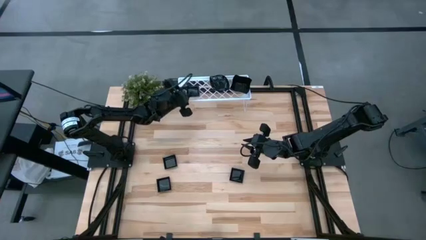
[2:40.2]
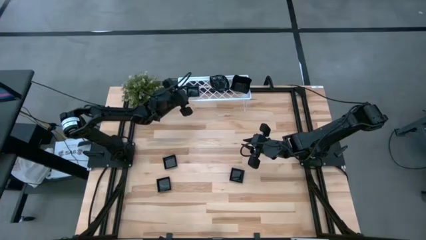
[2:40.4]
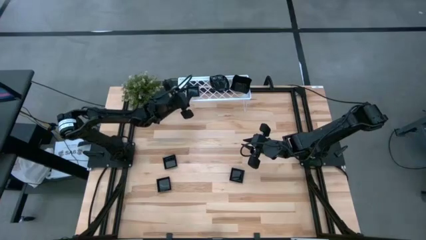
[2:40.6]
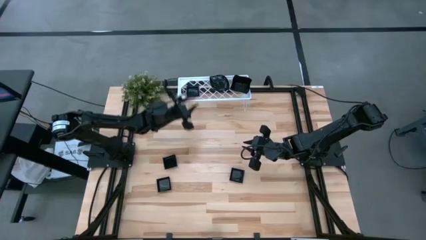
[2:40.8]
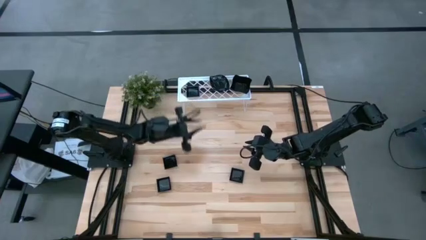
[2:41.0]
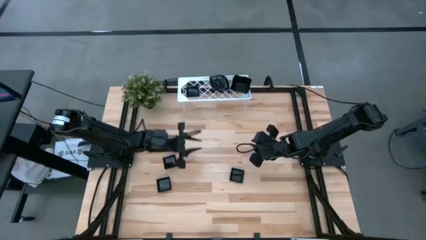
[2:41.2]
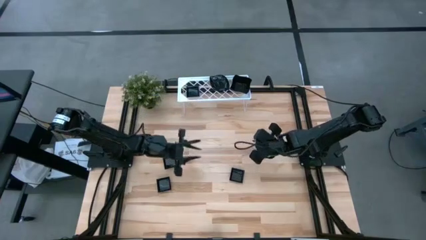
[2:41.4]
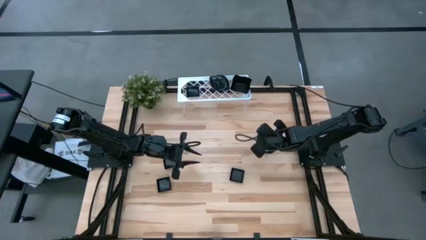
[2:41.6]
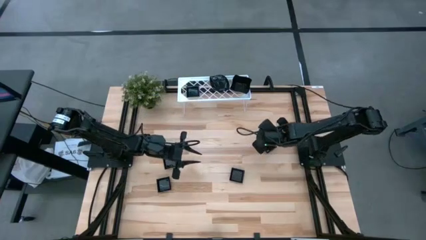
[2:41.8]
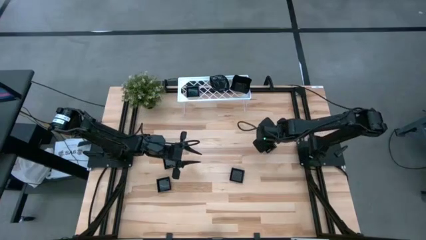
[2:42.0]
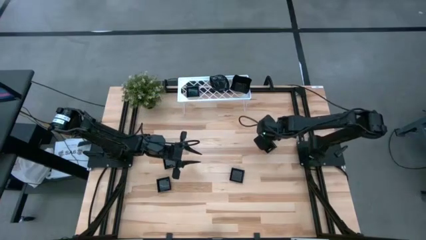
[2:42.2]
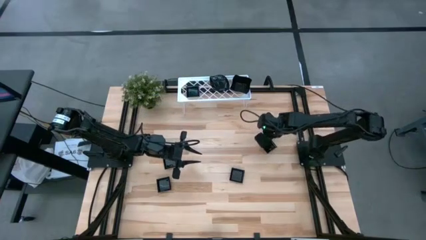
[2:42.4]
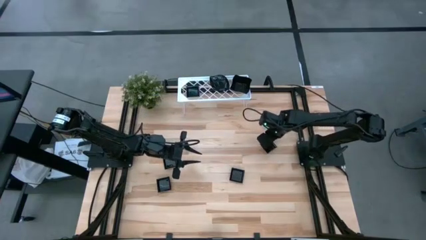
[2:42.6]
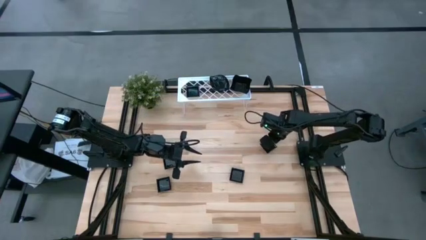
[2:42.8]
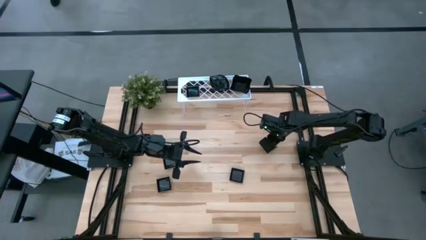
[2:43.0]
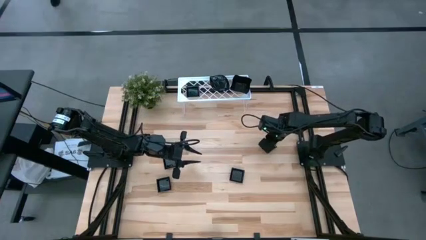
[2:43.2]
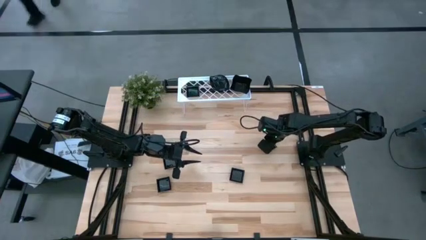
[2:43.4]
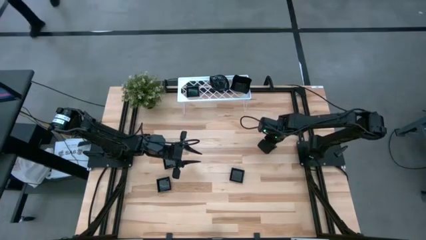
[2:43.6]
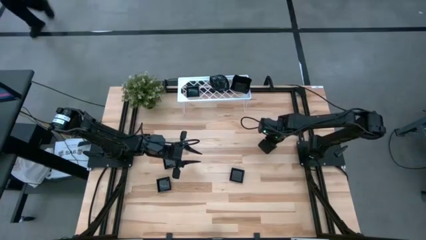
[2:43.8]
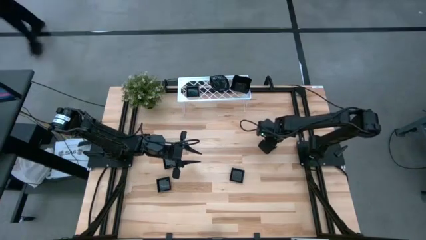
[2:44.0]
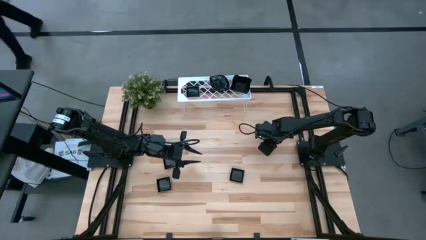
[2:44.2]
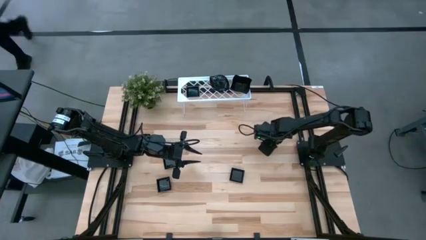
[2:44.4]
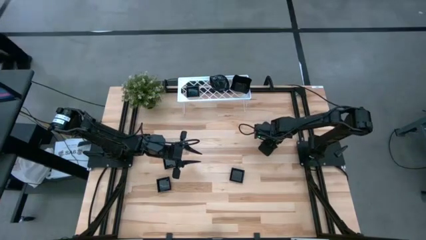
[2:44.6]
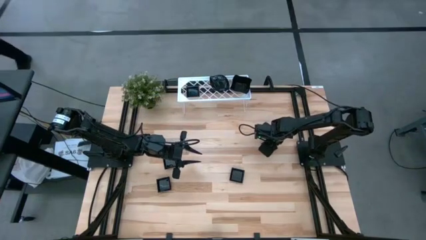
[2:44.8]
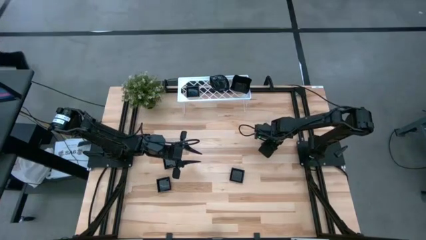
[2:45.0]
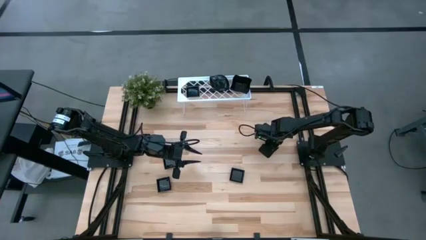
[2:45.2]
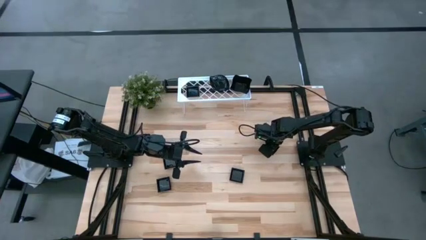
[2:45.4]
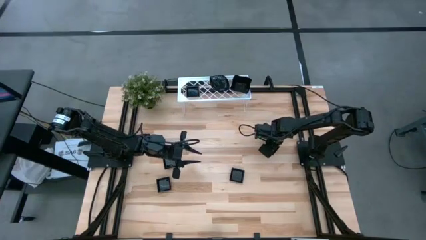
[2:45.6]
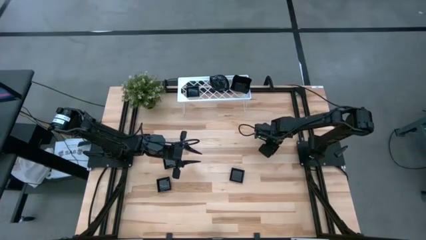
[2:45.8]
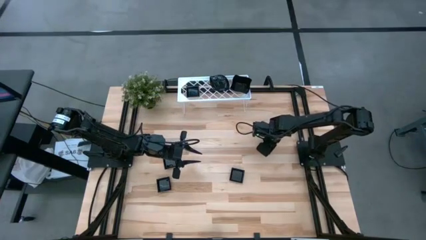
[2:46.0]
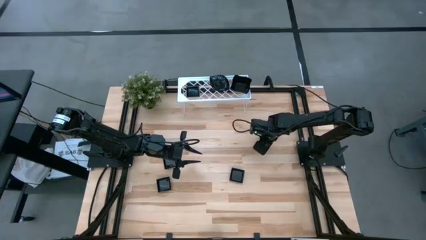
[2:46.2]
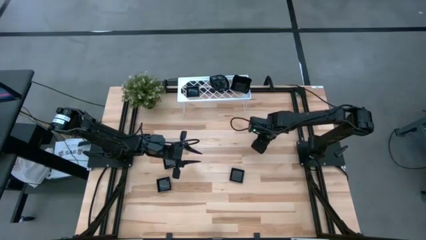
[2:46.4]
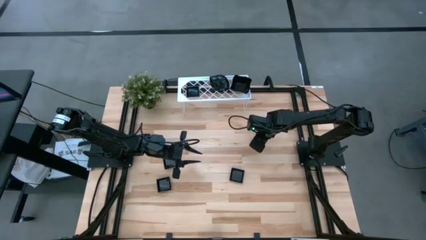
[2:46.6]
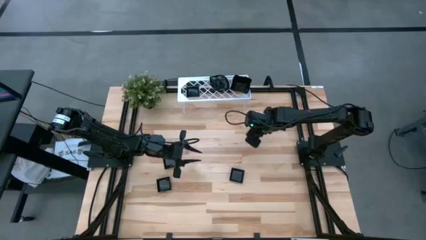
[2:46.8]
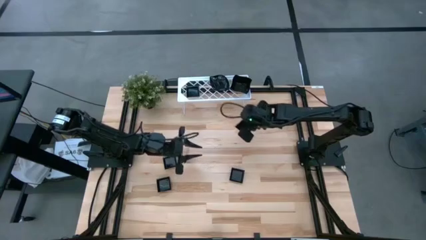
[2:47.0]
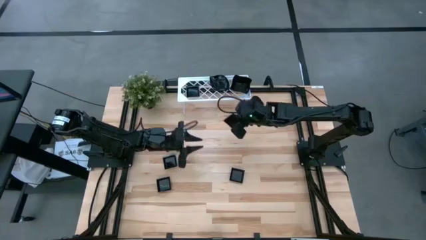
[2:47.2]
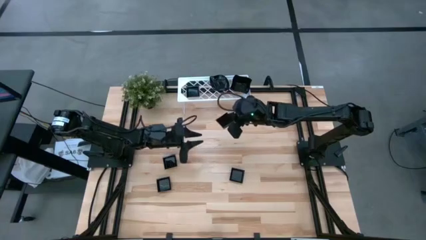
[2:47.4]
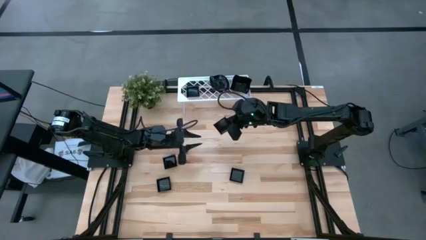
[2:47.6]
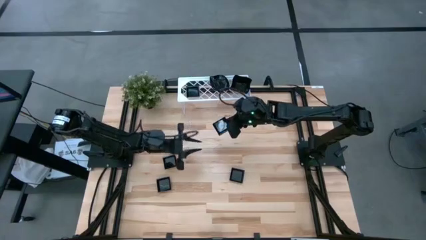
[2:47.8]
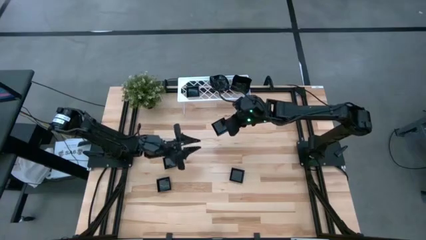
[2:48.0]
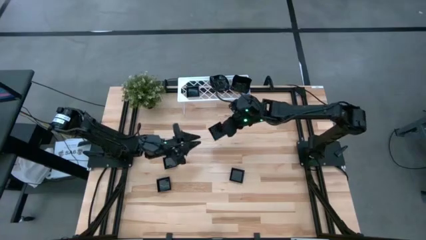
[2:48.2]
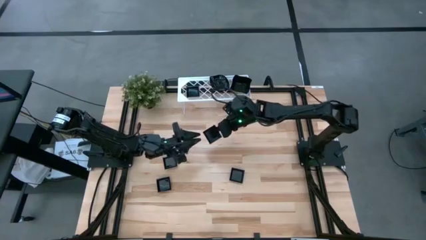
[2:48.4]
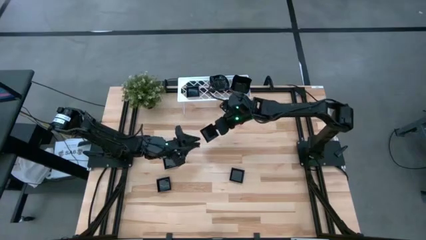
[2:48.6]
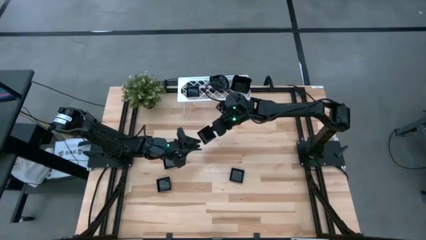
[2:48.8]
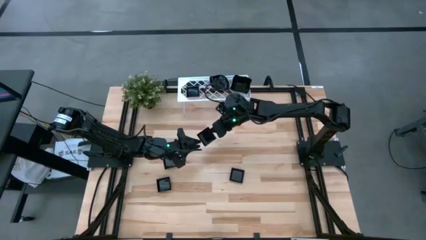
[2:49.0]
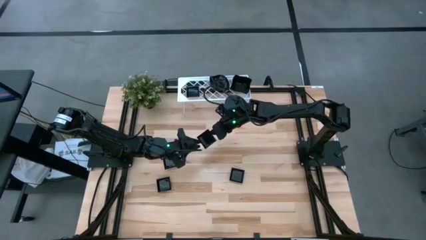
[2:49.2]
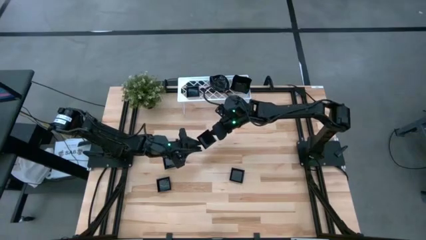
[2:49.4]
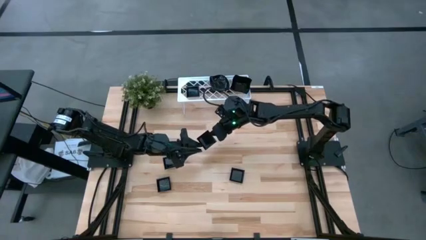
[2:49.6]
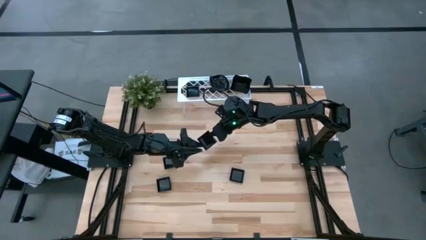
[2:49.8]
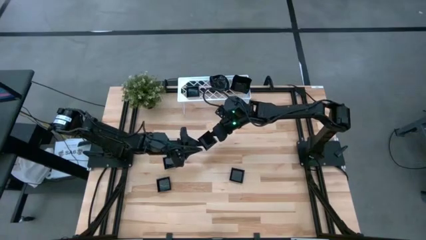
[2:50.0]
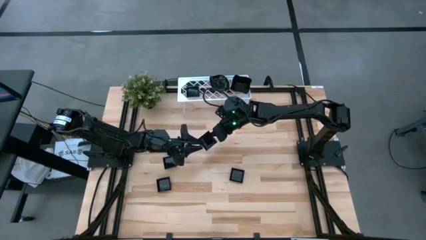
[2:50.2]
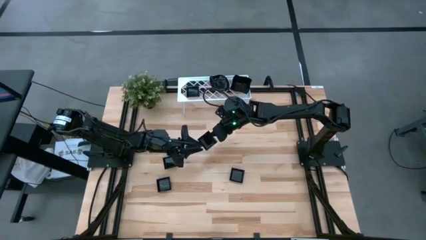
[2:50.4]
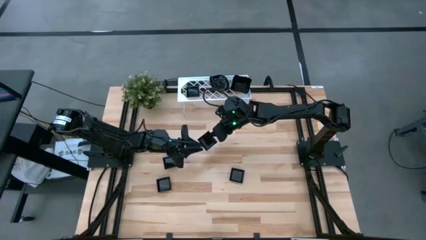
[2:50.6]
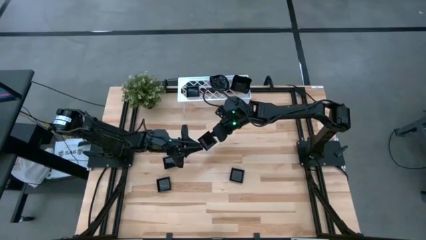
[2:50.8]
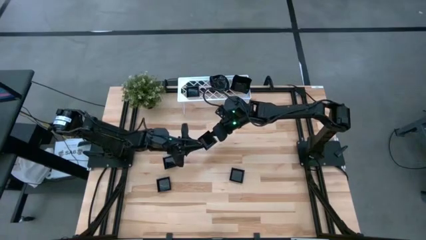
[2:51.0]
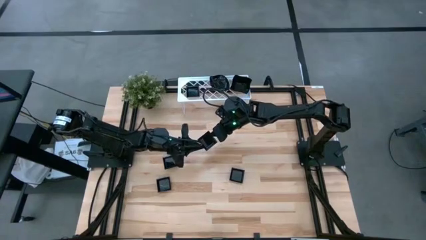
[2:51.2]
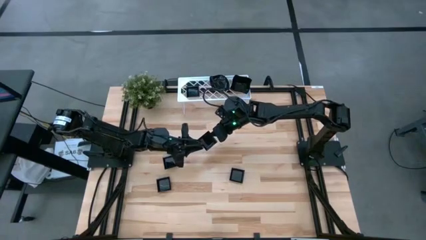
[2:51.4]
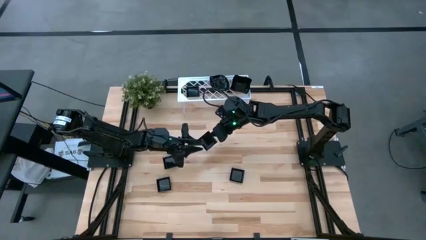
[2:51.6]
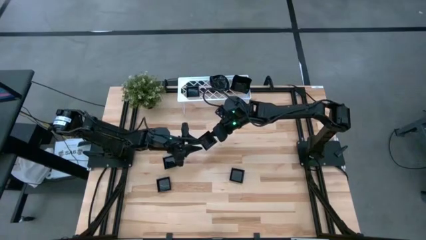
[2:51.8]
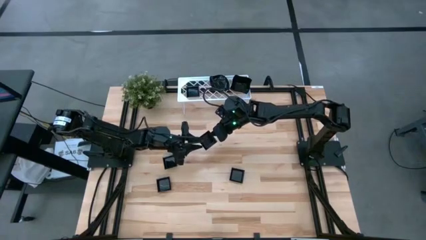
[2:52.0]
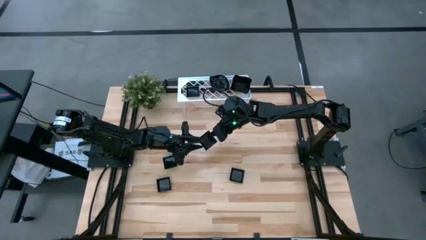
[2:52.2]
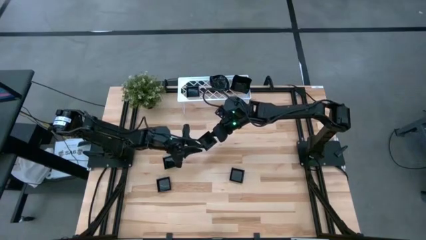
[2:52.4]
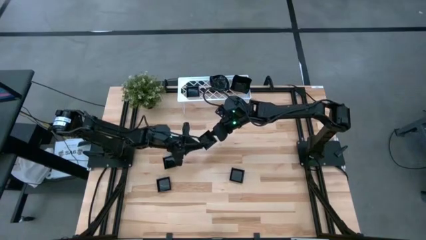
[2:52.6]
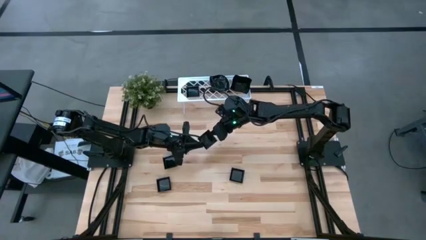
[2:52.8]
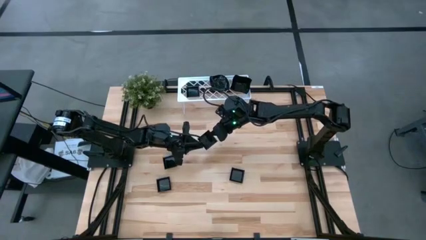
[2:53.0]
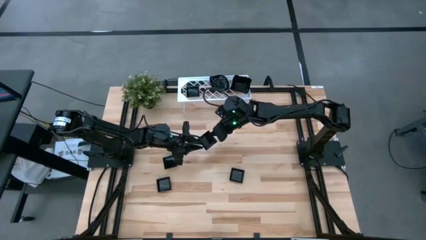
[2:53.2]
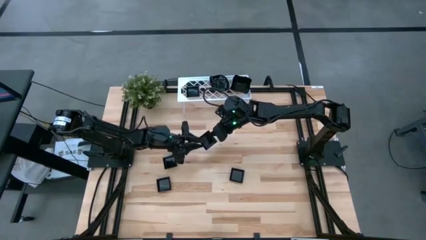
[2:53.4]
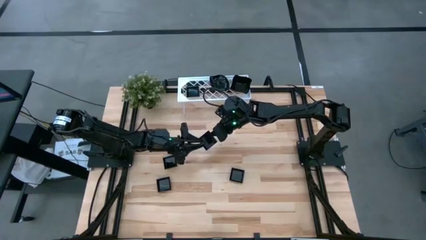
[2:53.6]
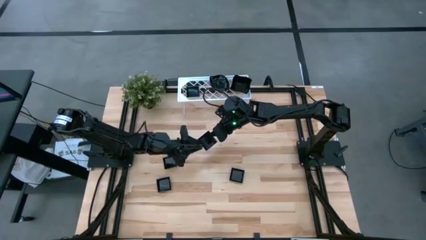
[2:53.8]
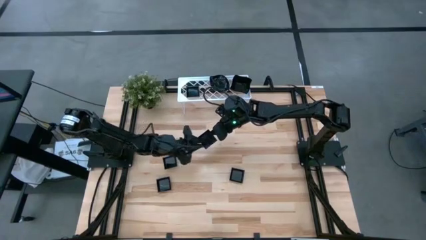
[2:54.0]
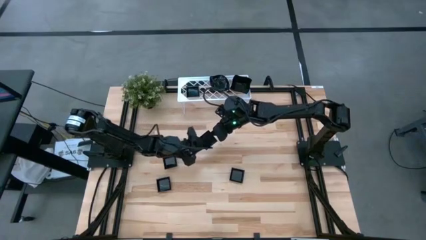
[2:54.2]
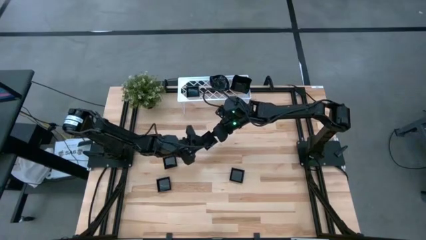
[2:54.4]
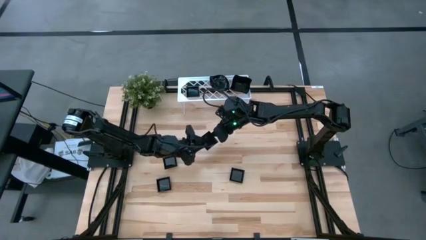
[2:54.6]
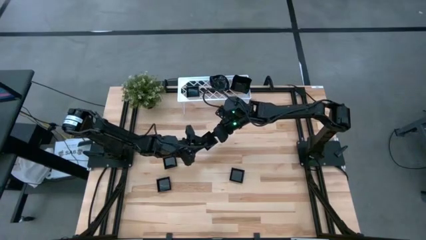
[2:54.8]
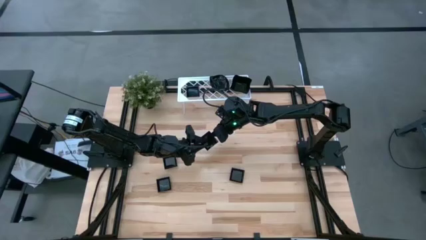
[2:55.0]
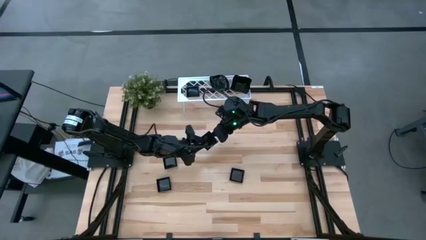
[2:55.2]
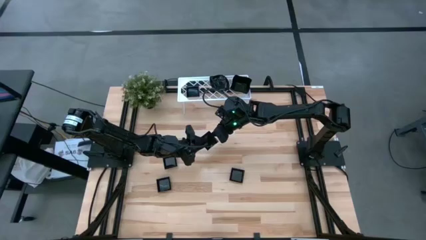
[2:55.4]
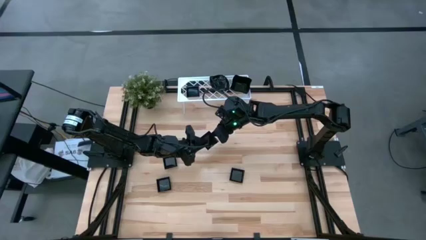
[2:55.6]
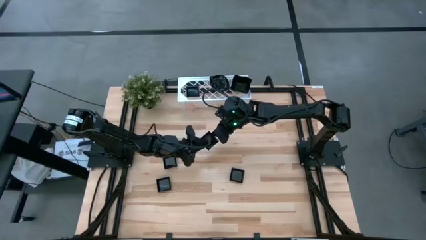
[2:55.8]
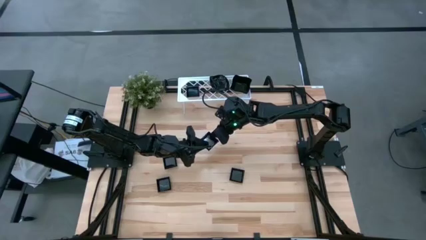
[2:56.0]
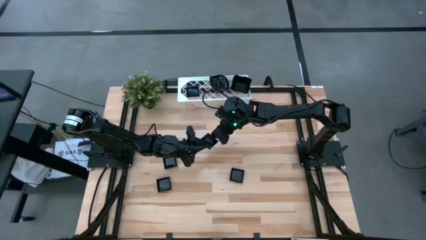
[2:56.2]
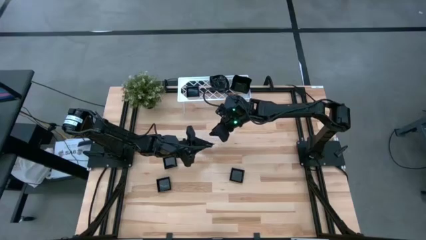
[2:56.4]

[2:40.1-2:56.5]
Task: Pick & Place Mini shaped plates
Stack the black square plate on top of the black square plate on the shelf
